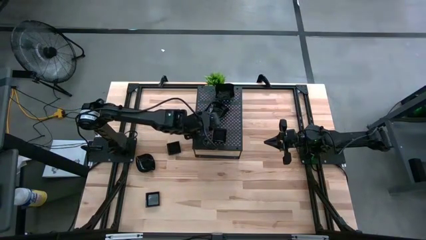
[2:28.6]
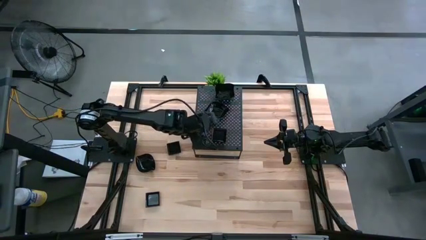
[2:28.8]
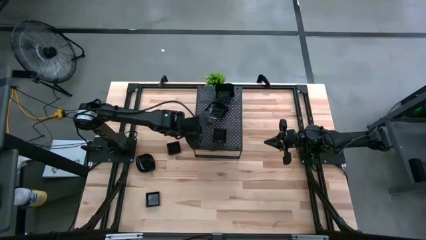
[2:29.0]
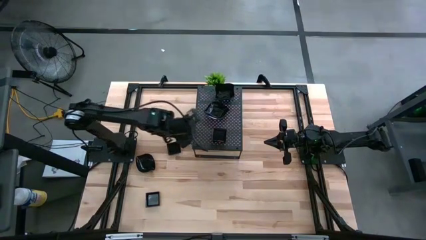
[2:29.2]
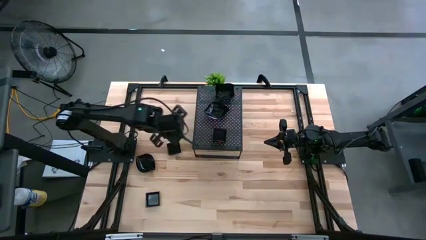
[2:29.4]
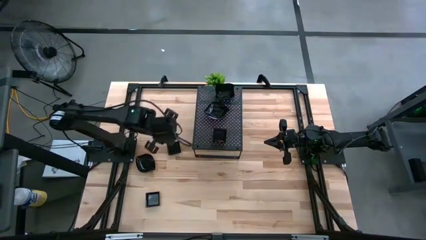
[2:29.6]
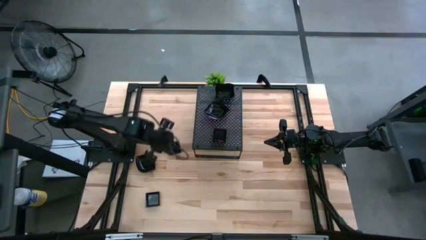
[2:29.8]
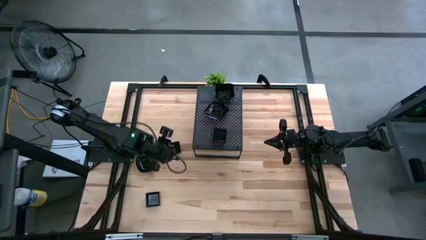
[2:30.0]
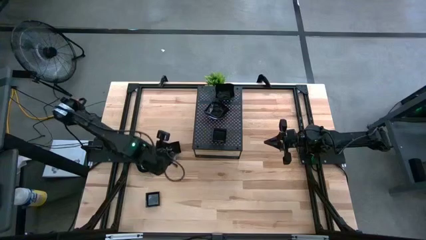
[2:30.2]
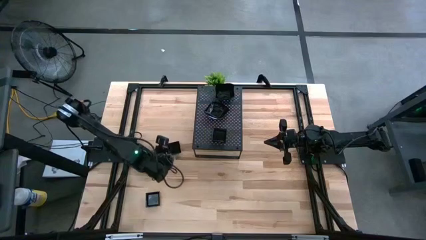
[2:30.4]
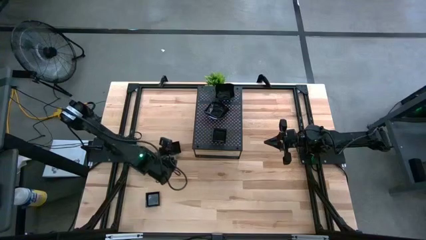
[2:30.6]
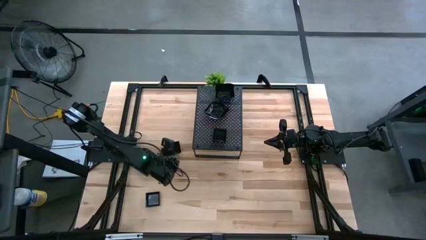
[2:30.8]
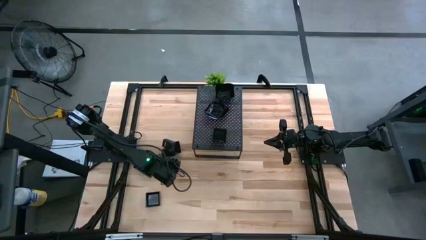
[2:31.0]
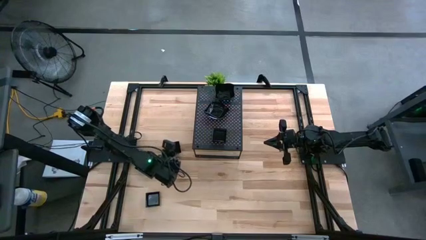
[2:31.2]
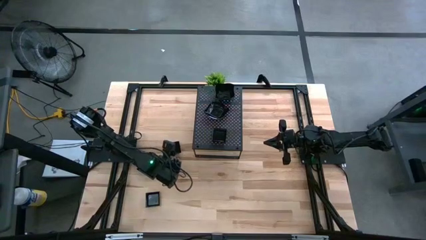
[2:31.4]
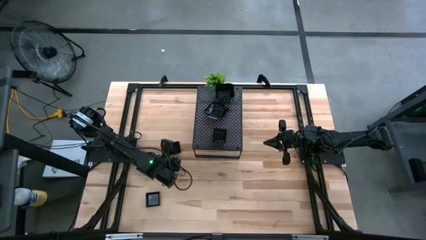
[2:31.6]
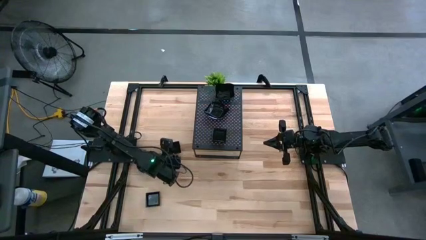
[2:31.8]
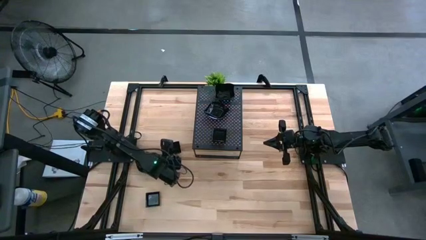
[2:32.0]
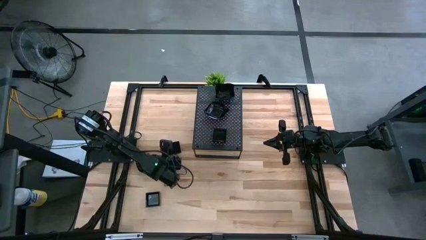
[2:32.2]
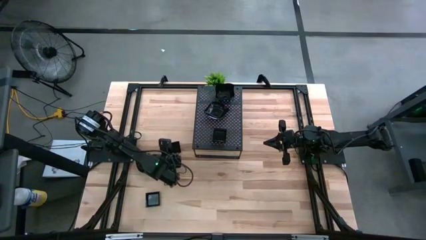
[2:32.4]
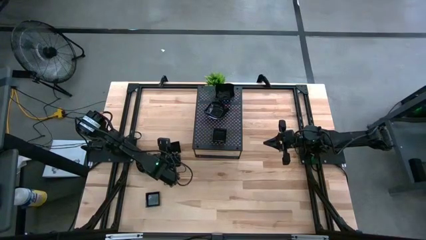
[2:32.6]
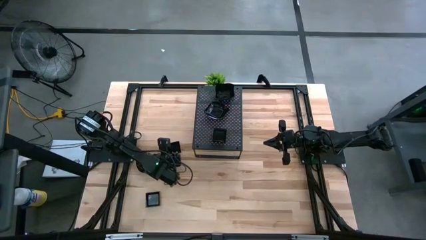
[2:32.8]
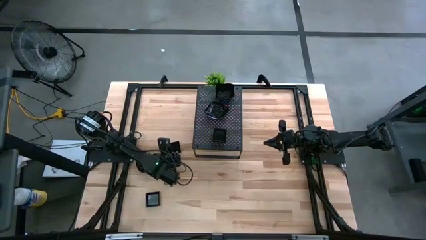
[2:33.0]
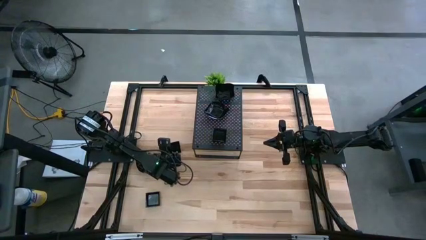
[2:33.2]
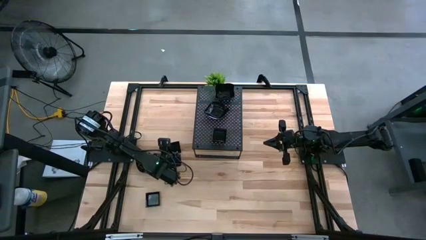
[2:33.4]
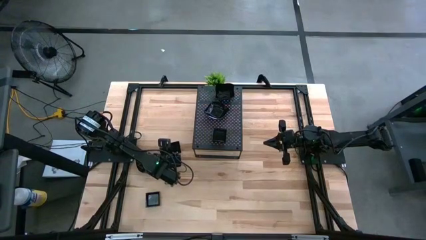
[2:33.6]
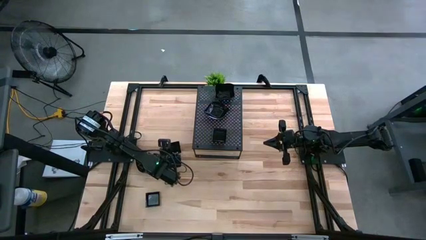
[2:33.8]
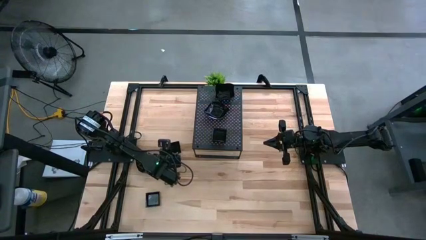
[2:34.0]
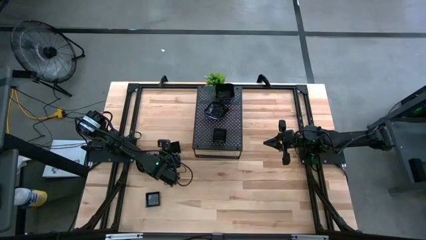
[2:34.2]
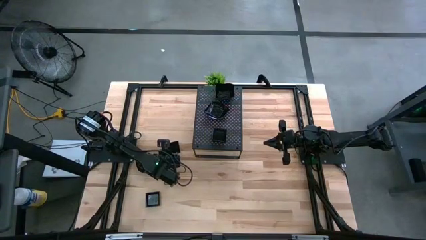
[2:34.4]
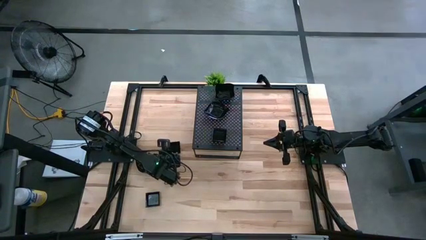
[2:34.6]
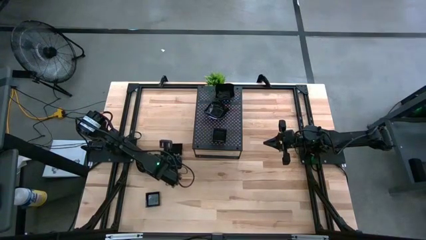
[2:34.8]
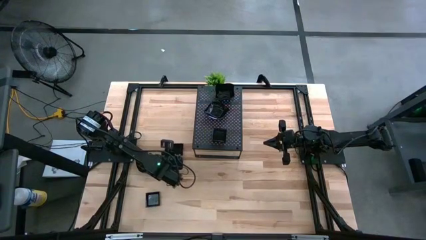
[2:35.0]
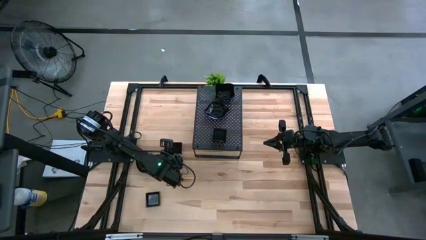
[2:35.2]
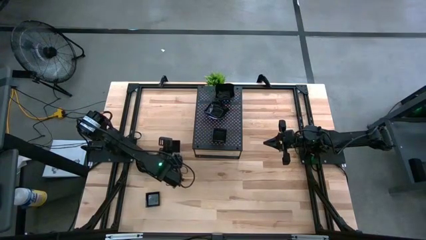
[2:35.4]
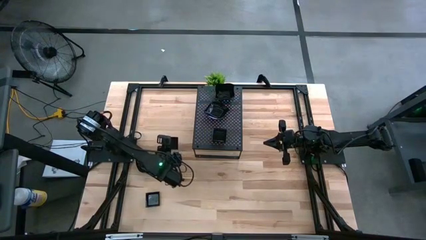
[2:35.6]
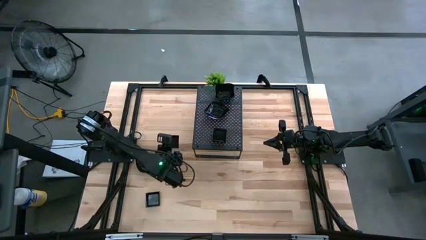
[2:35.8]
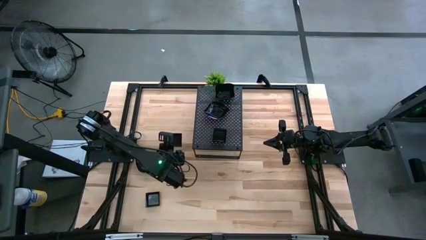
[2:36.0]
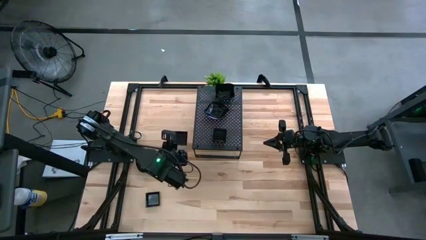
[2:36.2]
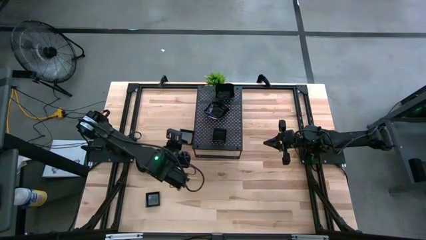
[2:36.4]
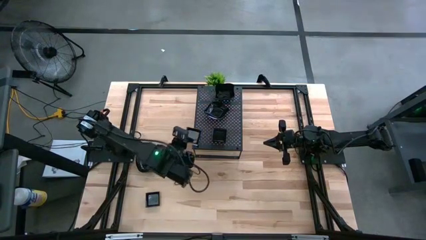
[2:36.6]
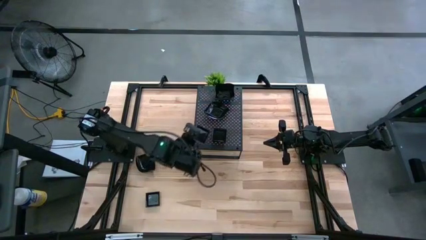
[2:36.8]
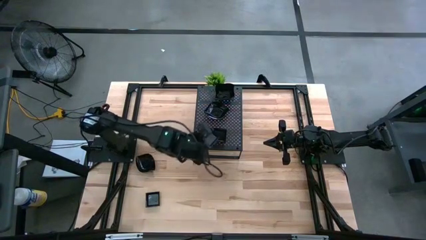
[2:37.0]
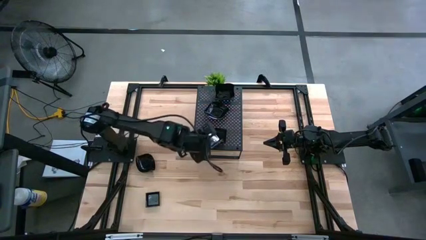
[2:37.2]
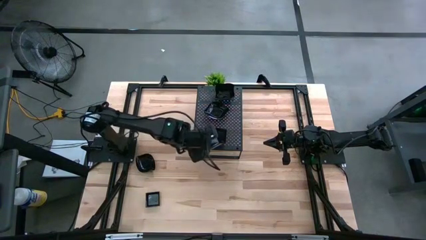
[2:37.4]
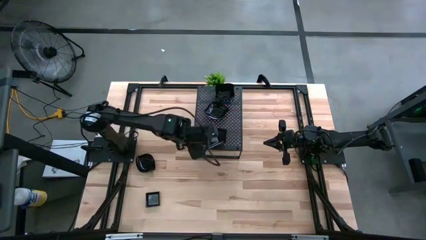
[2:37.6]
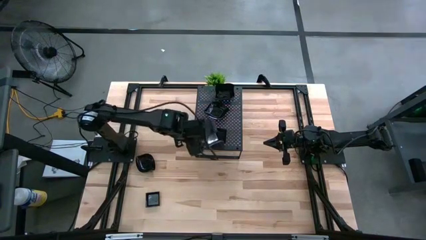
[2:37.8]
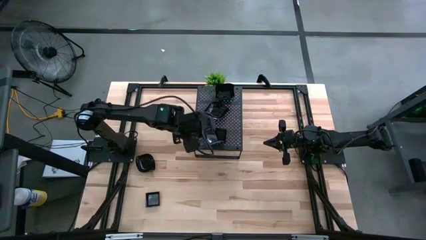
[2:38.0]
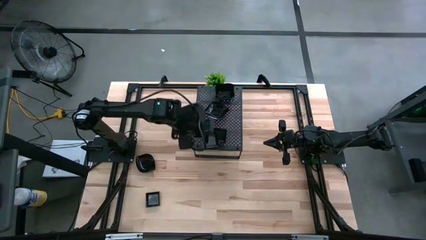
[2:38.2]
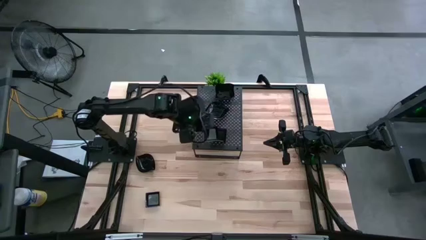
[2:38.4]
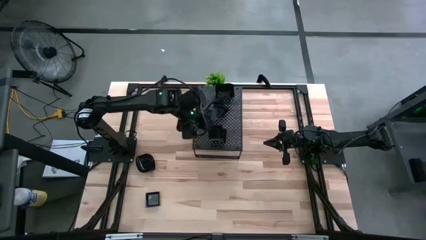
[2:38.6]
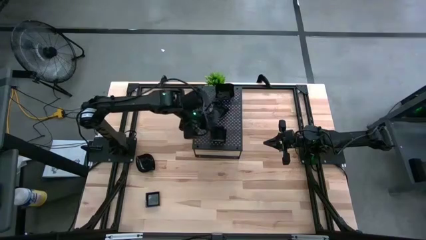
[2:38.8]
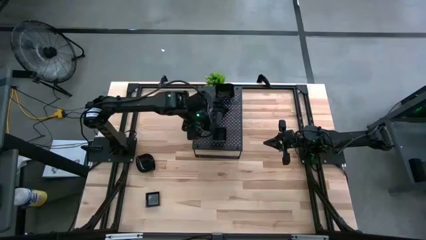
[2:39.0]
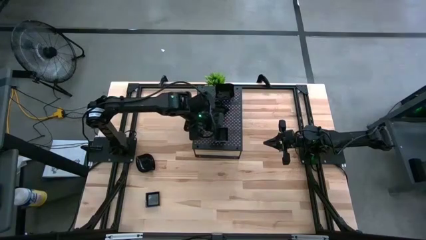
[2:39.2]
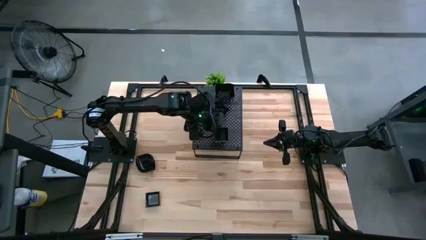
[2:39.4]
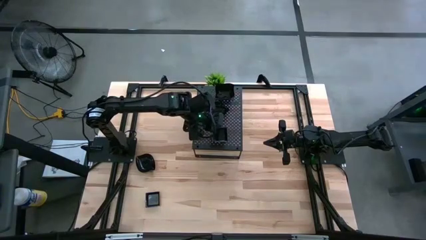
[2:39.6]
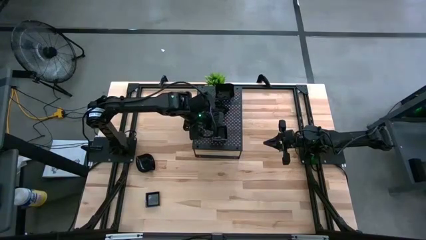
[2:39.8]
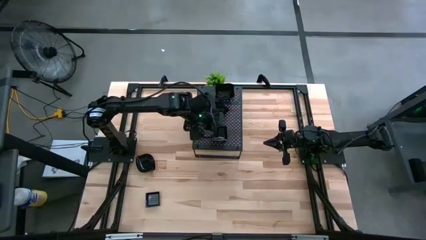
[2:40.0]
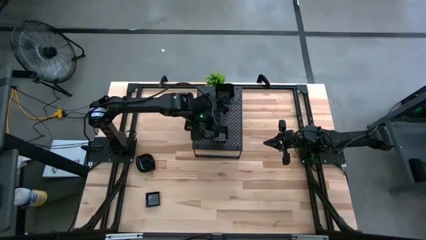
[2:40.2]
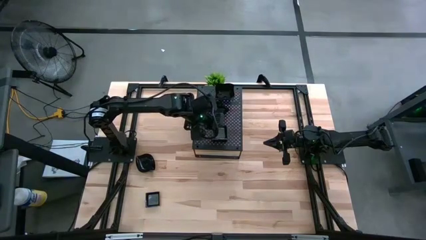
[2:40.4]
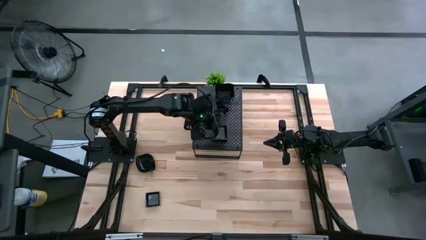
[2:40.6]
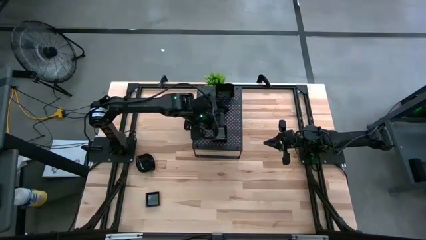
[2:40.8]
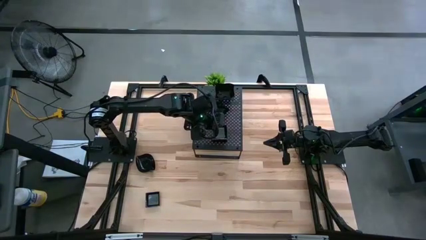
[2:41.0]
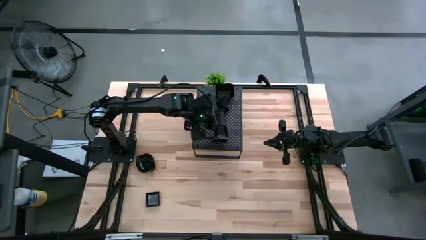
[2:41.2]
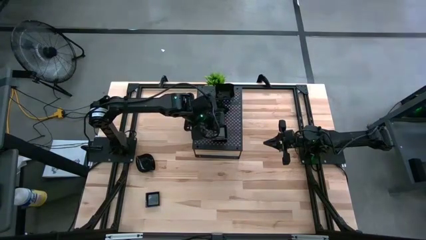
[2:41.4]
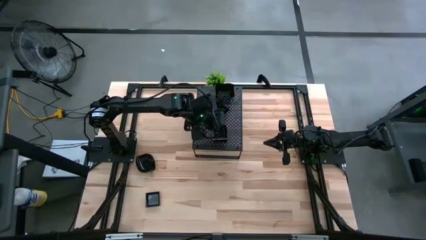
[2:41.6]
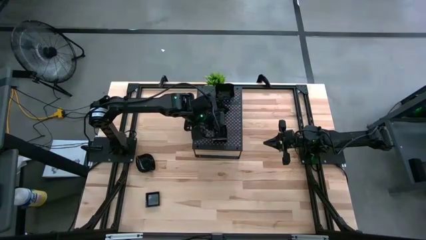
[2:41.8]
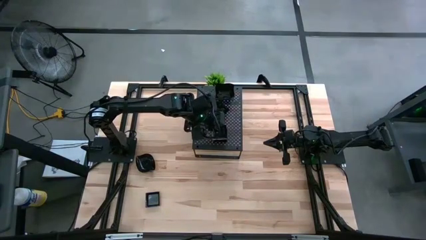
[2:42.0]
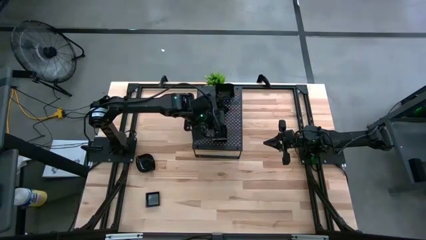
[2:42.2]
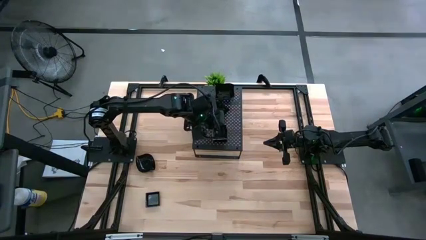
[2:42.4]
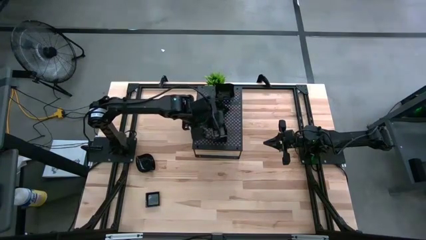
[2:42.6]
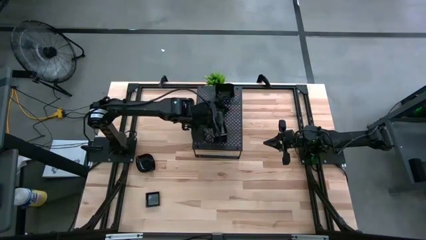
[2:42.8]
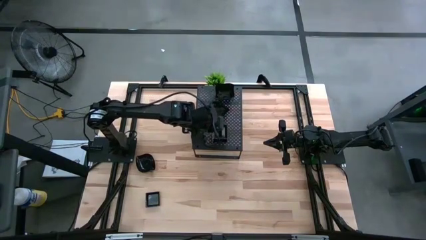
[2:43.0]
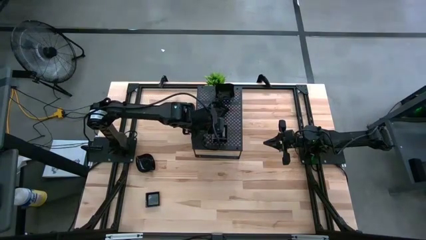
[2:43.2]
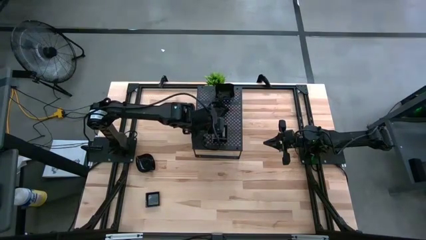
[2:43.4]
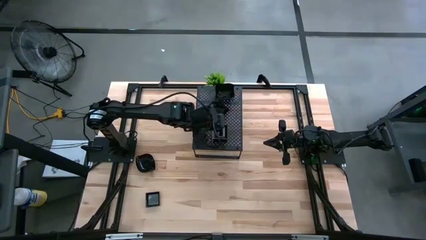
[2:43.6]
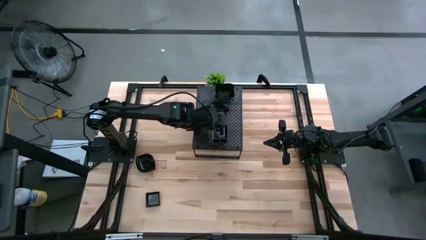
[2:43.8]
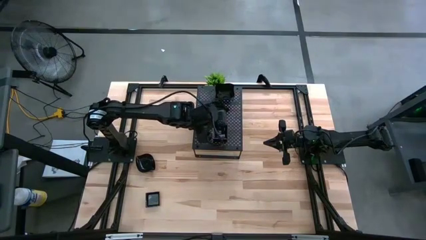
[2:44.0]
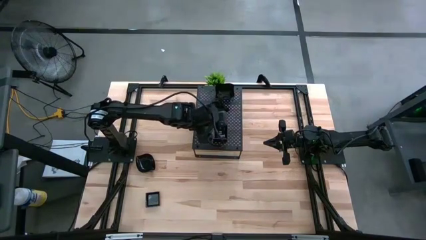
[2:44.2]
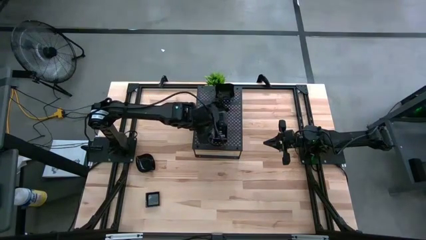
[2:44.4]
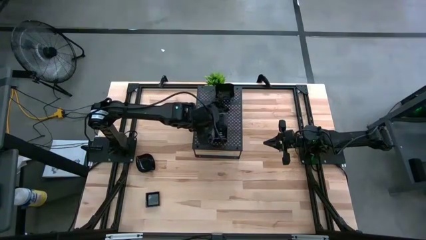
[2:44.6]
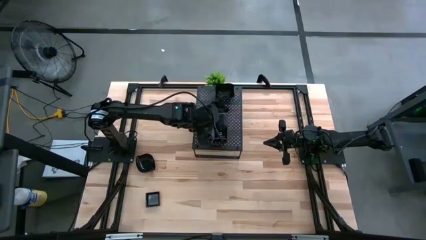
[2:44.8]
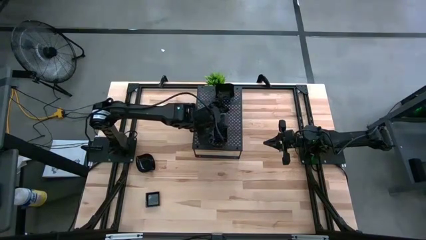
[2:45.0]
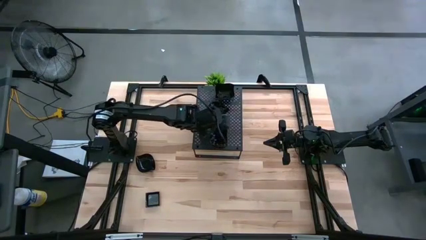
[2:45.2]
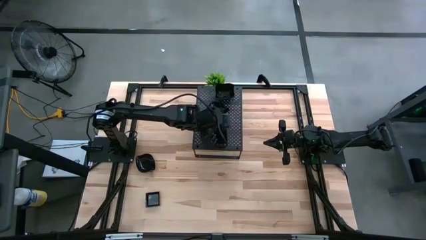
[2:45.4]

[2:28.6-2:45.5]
Task: Pick & Place Mini shaped plates
Stack the square plate on top of the square plate on the shelf
